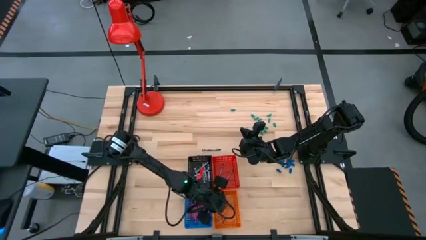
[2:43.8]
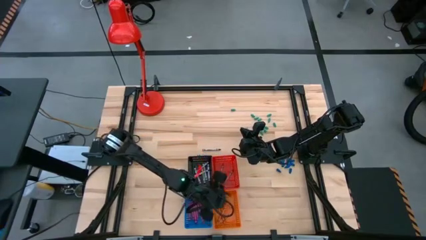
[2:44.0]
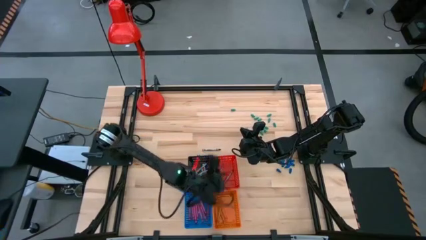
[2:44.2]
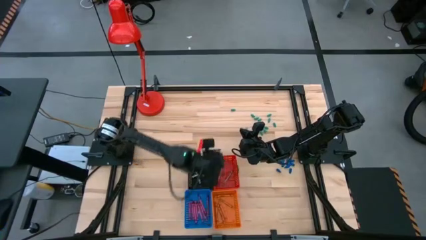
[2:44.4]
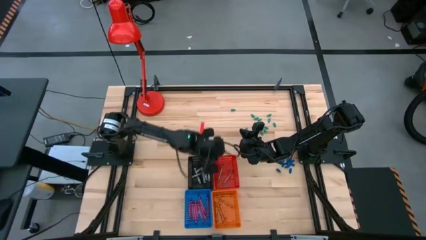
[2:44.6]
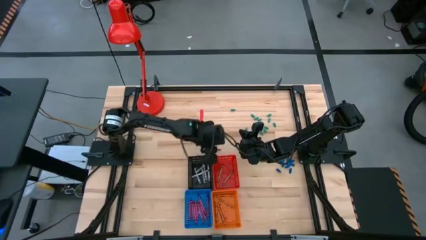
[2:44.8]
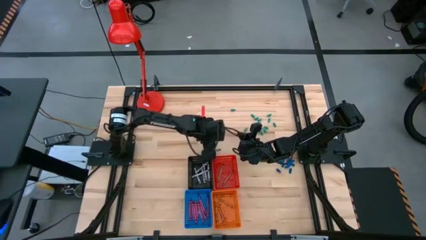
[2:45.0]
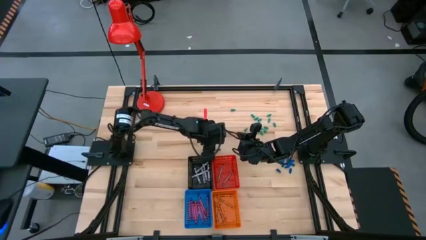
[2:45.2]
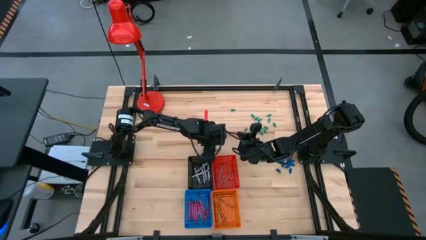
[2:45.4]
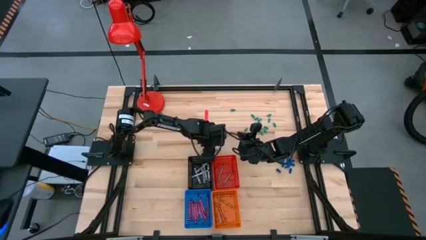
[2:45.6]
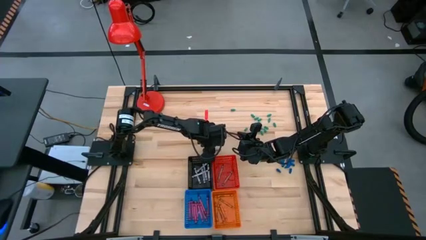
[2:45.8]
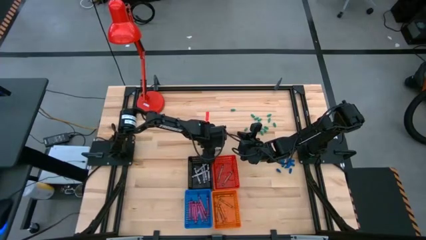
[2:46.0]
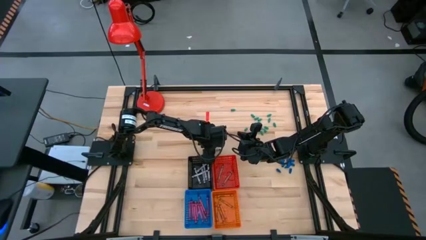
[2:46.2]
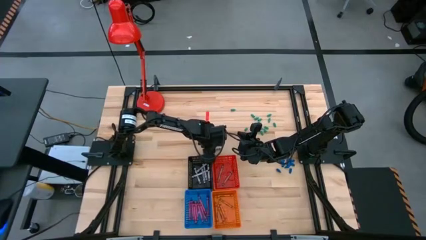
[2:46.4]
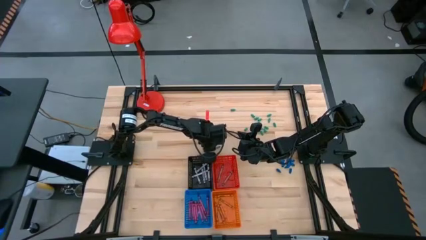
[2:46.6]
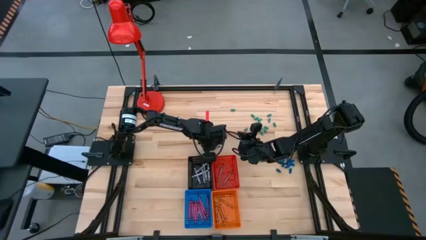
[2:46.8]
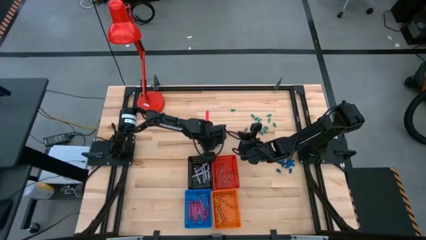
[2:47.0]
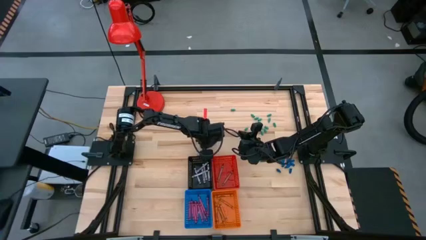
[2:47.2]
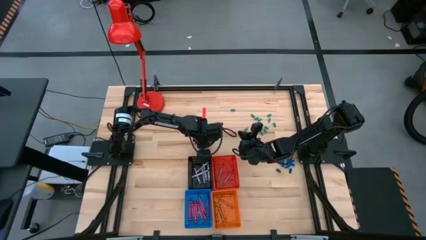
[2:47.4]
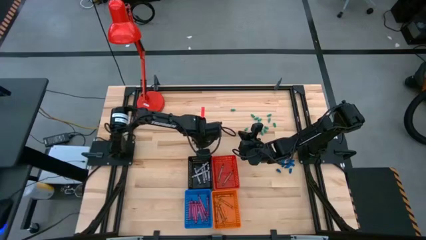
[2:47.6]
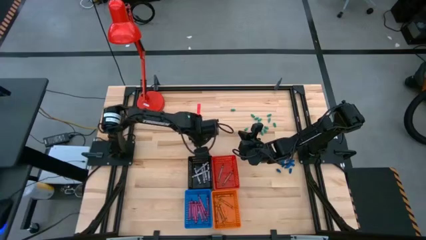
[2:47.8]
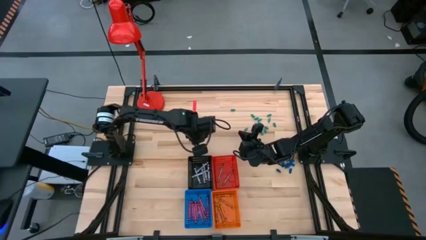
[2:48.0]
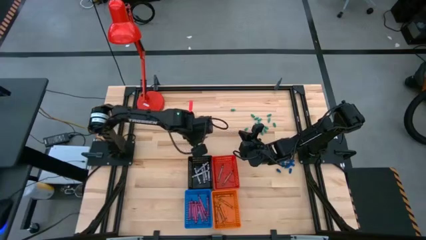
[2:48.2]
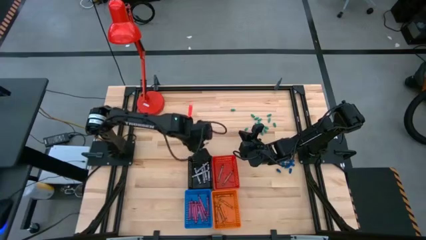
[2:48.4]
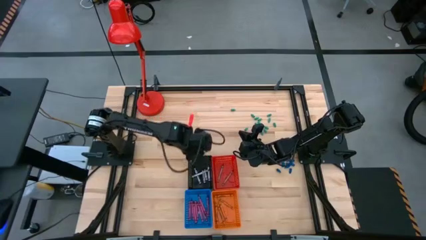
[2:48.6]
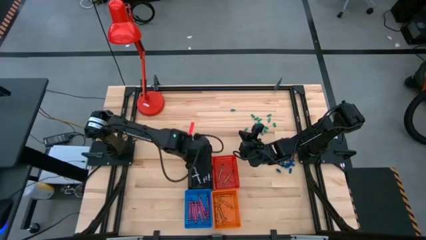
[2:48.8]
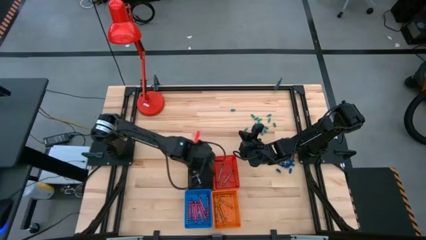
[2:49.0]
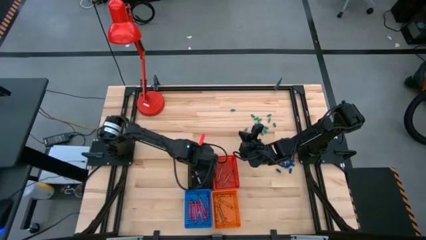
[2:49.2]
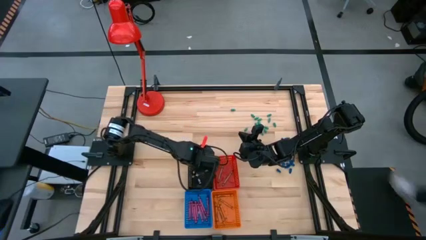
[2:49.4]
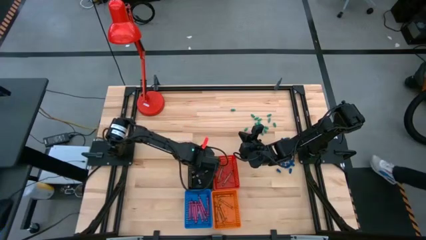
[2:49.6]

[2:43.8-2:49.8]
Task: Sort crayons
Put the black crayon into the black basket

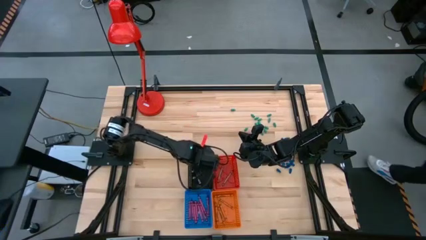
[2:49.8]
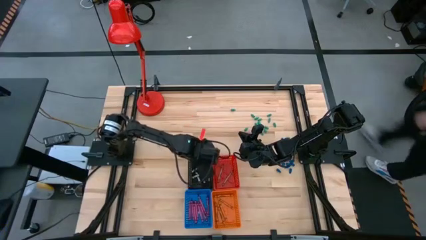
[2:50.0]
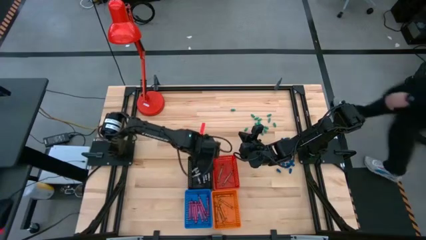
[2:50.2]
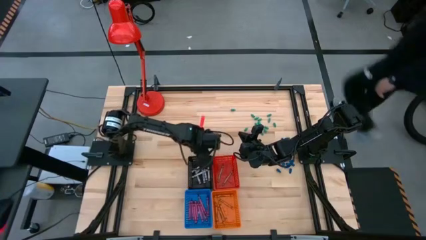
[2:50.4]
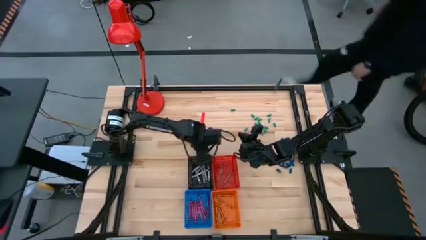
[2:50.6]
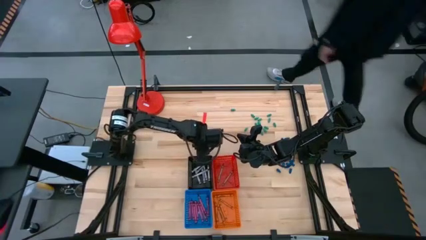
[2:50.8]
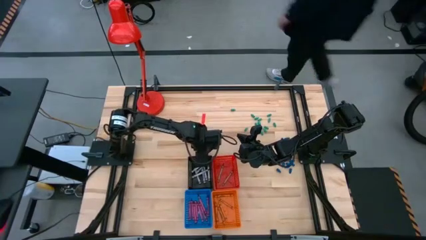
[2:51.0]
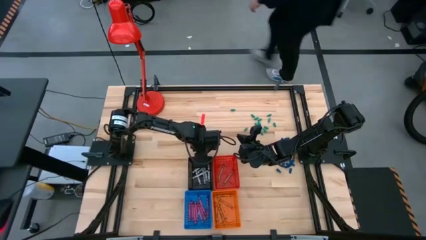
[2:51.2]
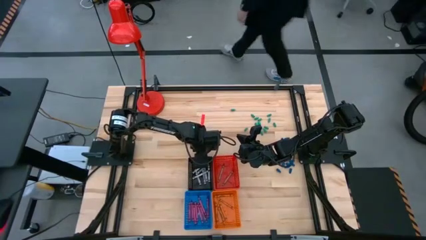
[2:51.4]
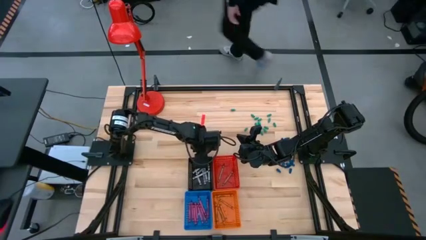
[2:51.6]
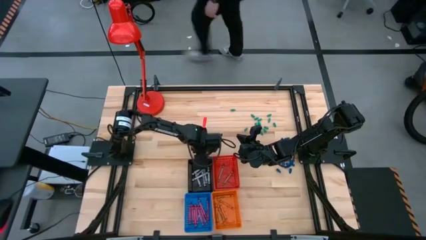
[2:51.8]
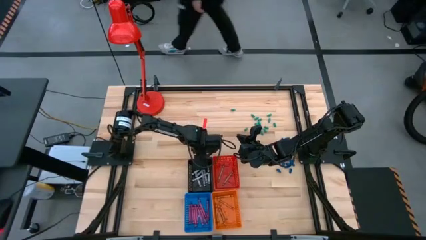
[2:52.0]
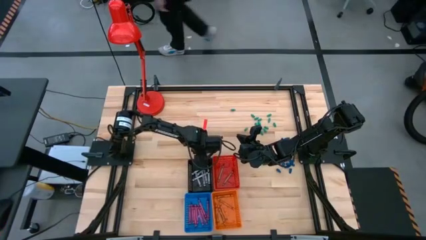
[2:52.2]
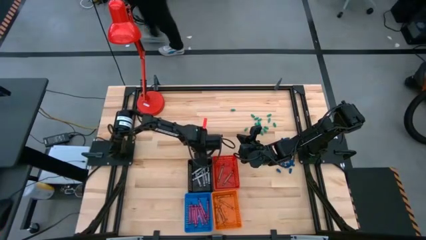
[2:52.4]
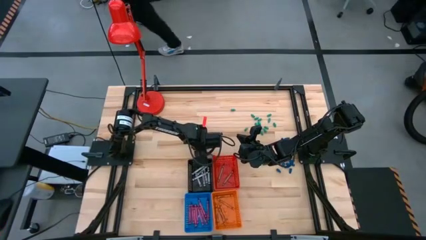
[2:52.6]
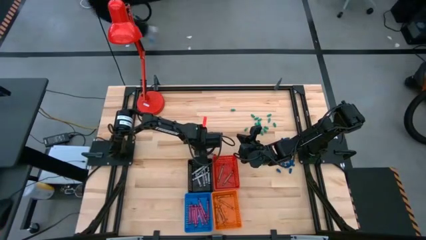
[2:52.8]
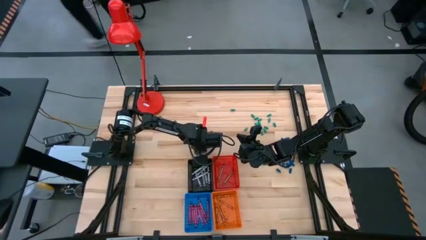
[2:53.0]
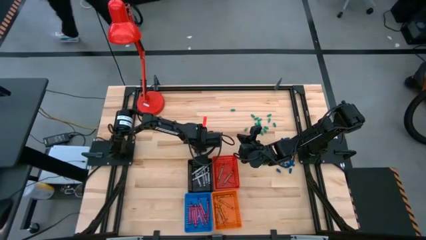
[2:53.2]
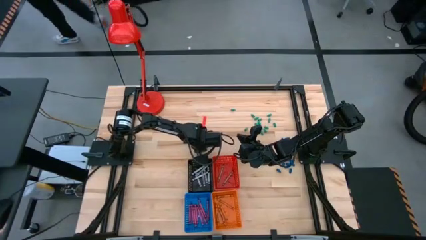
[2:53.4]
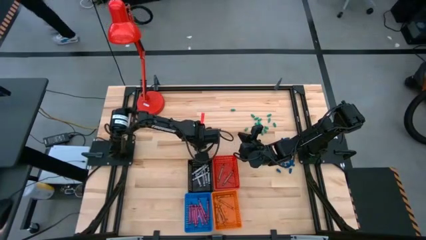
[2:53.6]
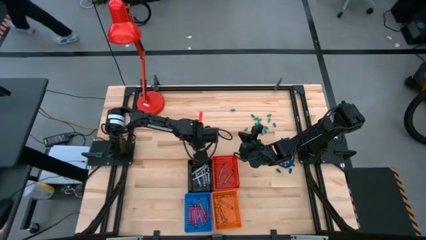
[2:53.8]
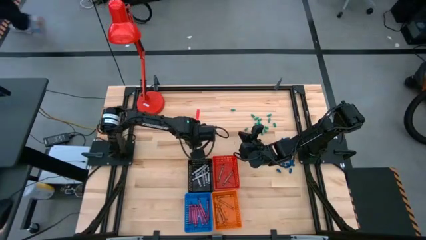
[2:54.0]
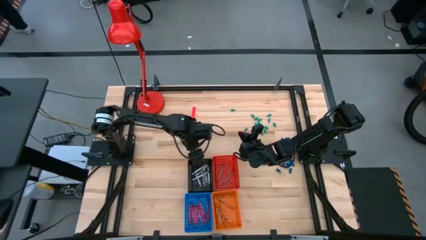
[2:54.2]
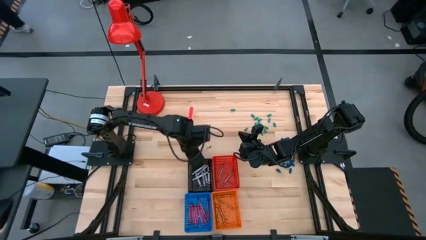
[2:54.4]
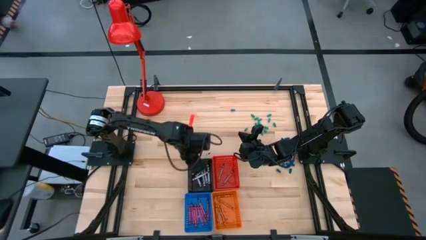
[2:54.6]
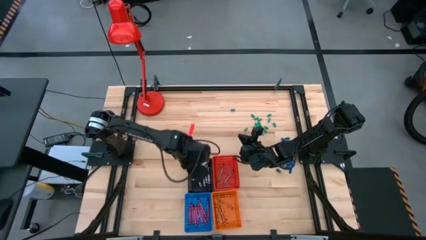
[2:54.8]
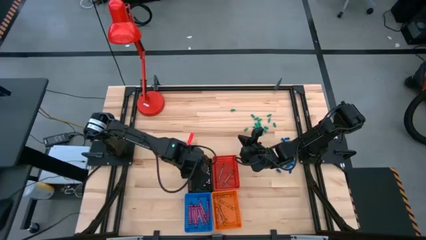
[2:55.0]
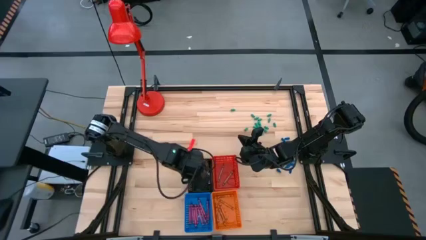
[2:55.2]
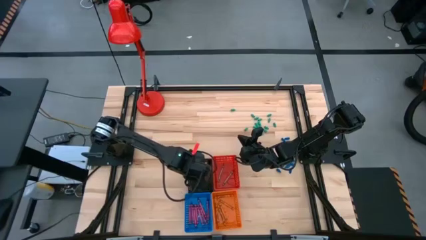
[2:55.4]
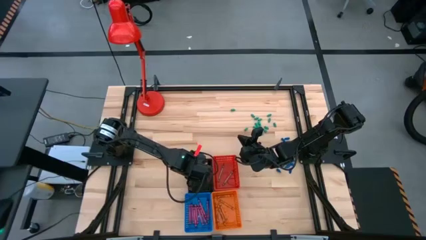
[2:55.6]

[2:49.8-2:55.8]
Put the black crayon into the black basket

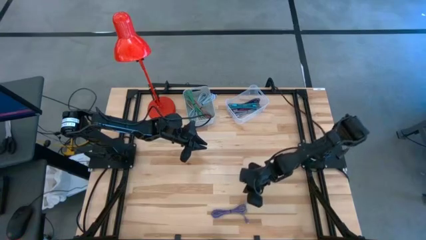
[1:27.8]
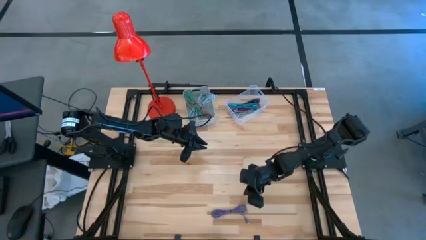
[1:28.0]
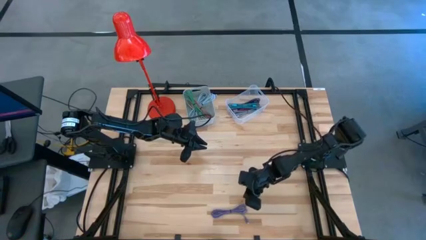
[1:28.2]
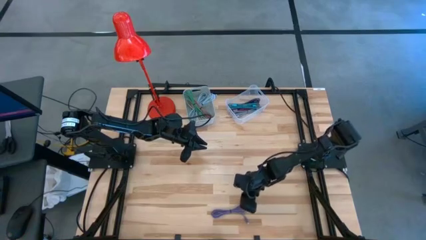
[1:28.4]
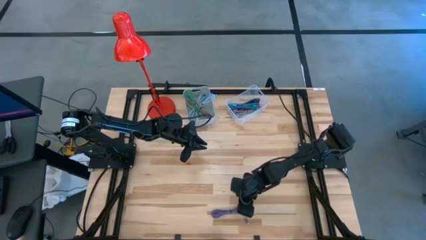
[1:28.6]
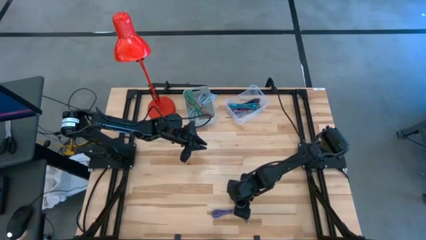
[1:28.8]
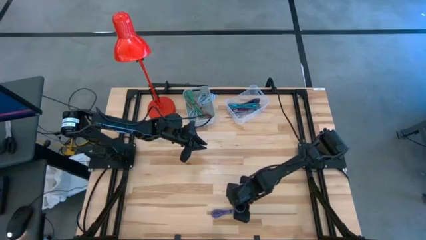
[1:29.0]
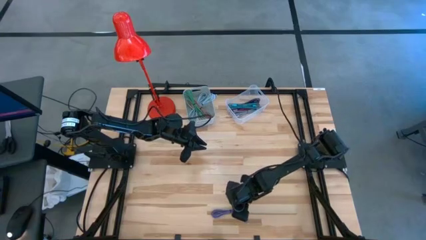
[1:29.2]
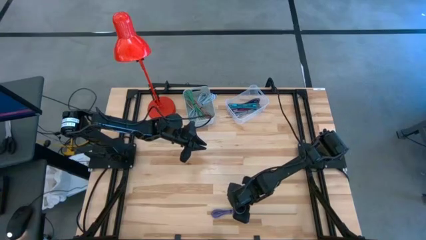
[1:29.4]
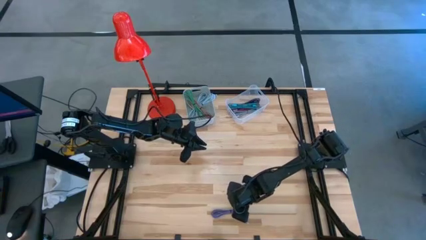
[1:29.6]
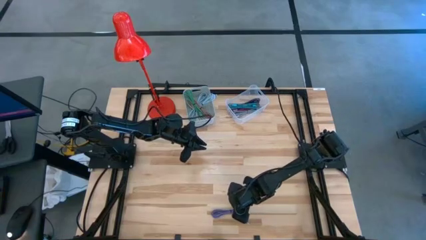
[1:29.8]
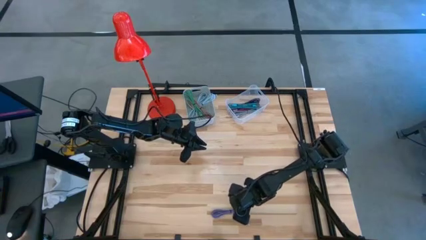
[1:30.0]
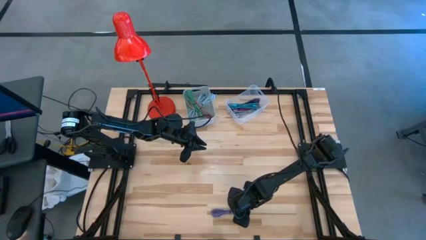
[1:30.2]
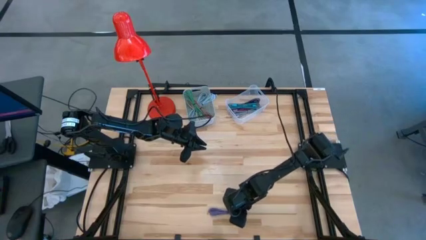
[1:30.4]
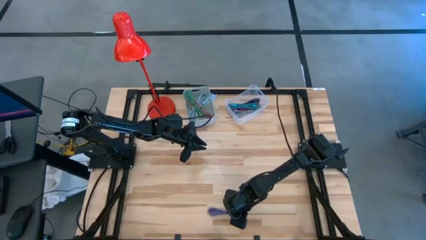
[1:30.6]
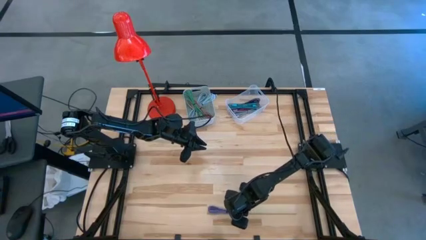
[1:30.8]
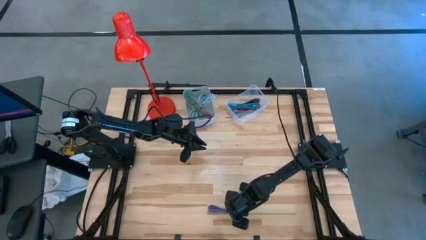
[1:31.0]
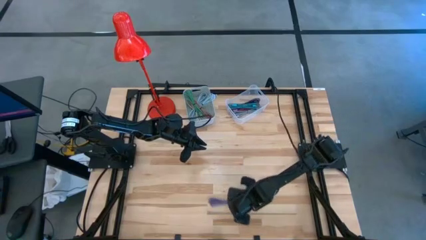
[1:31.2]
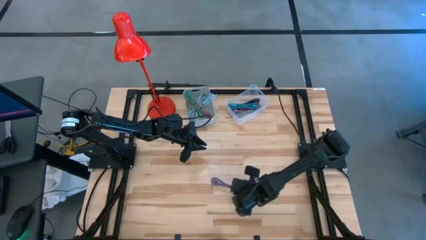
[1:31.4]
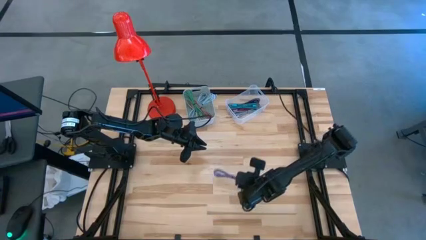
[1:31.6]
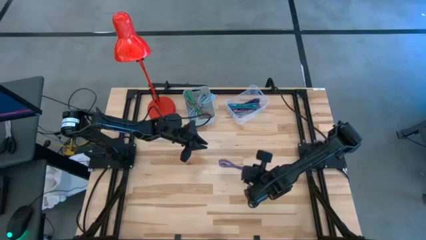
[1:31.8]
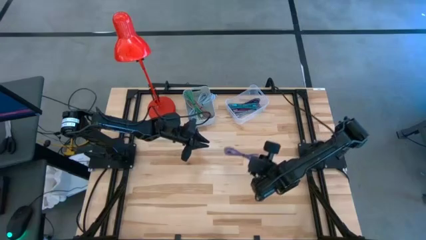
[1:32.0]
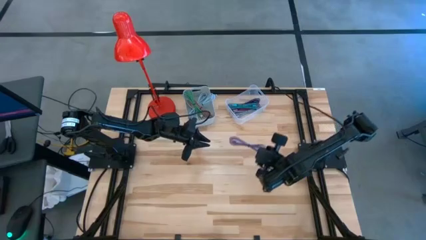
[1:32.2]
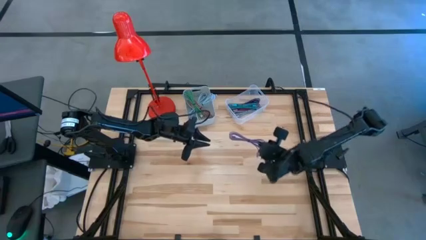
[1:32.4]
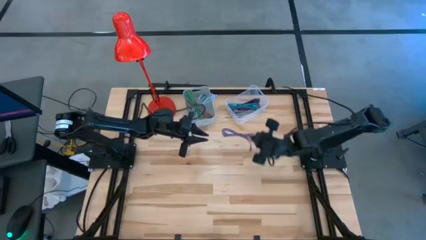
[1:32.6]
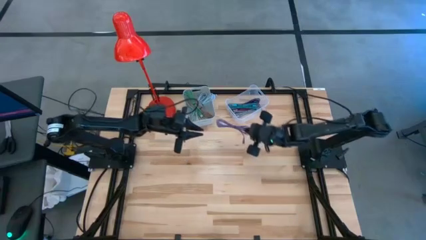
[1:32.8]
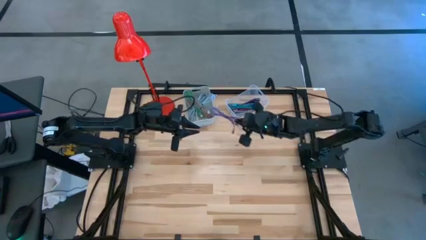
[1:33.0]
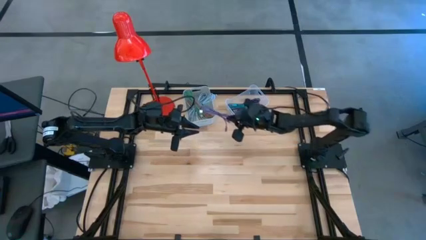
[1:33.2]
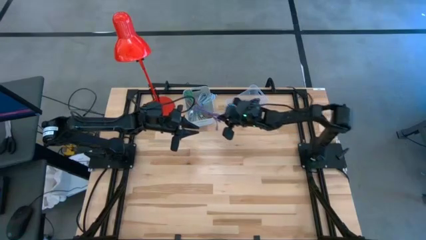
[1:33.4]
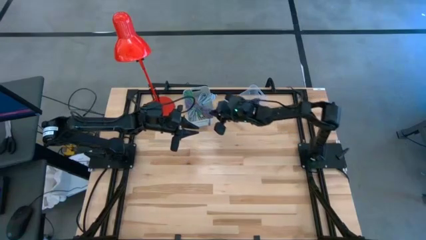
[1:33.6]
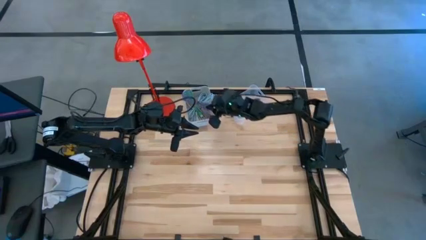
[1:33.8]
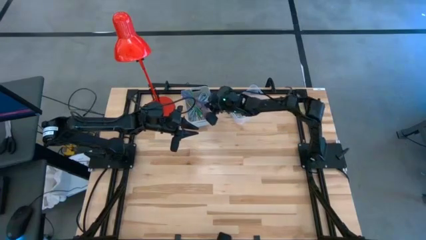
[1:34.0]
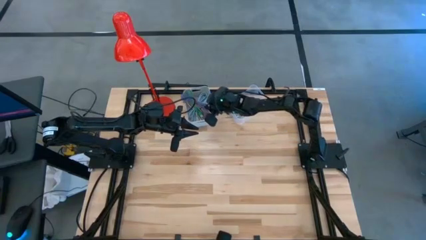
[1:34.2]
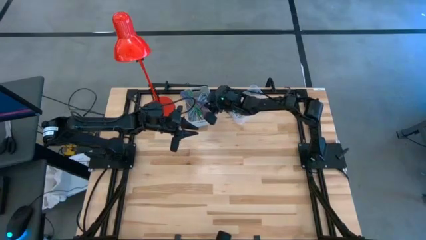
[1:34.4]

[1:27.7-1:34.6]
Task: Pick & Place USB Port
Put the purple charger cable into the gray bin
